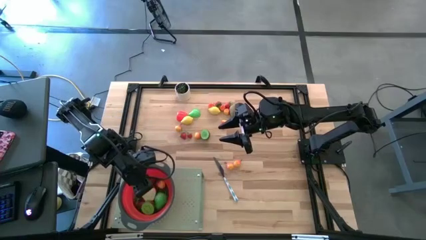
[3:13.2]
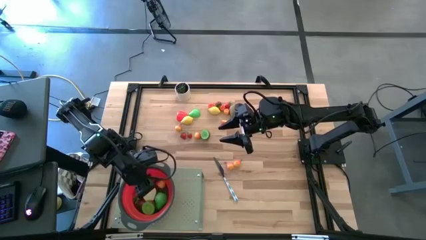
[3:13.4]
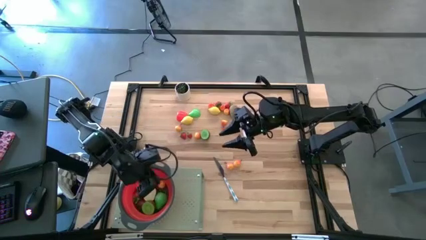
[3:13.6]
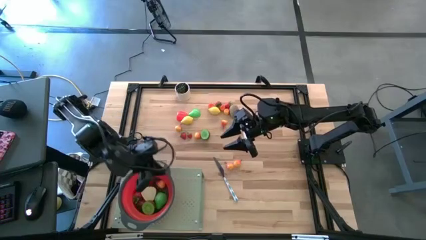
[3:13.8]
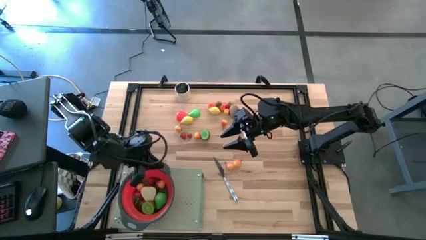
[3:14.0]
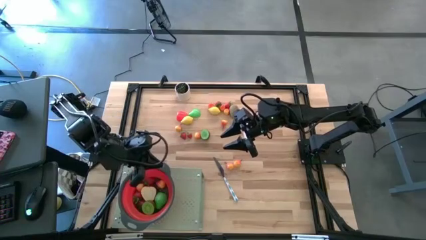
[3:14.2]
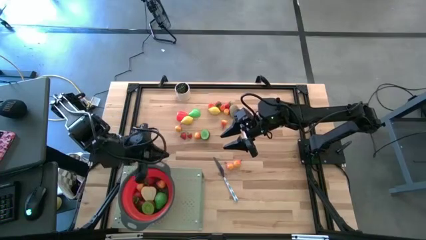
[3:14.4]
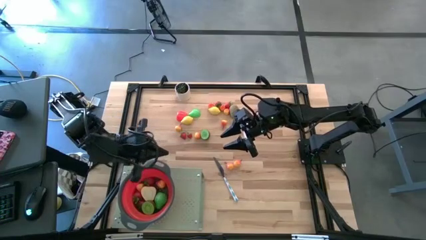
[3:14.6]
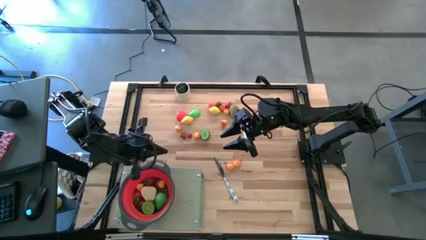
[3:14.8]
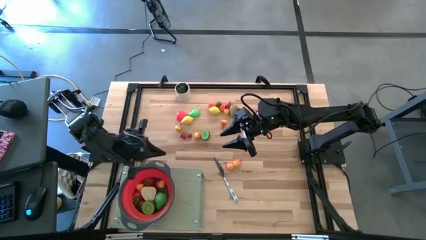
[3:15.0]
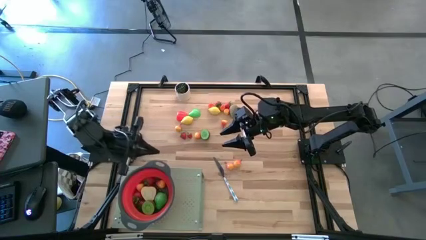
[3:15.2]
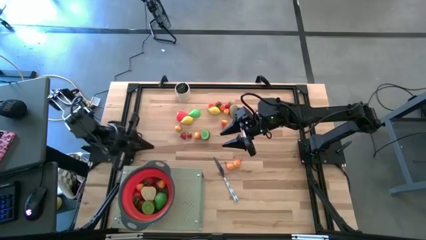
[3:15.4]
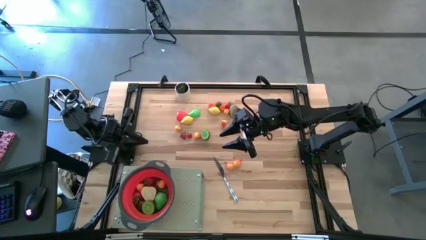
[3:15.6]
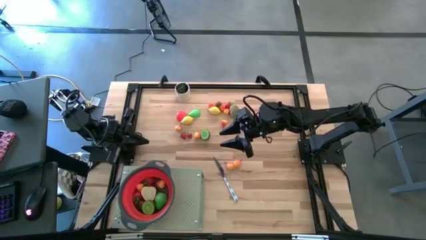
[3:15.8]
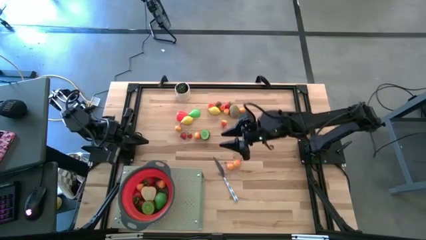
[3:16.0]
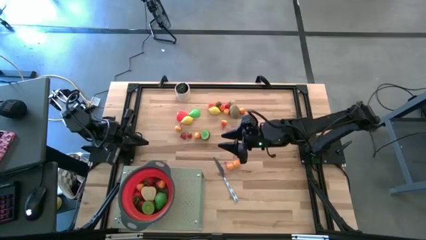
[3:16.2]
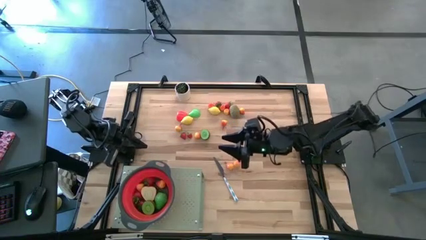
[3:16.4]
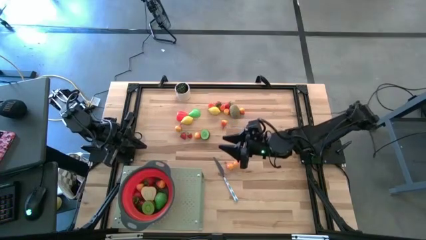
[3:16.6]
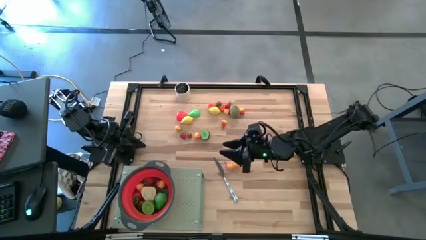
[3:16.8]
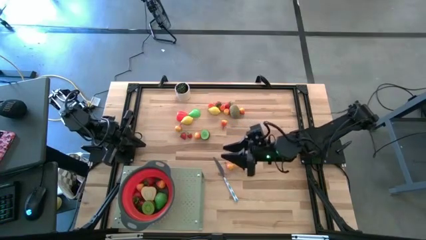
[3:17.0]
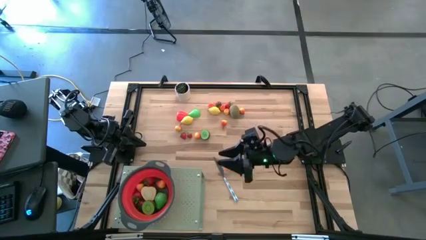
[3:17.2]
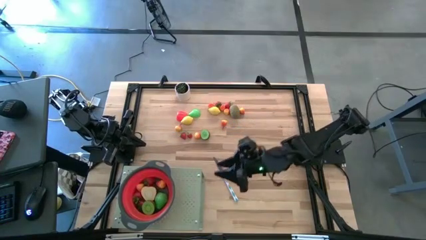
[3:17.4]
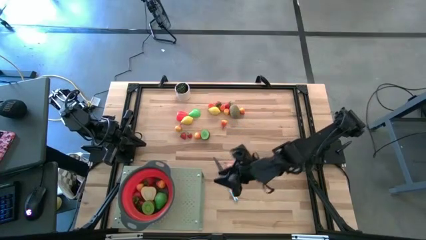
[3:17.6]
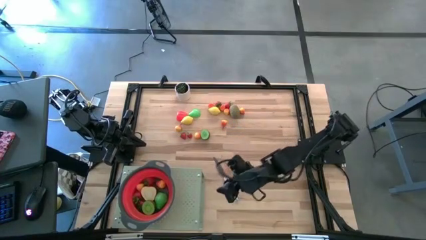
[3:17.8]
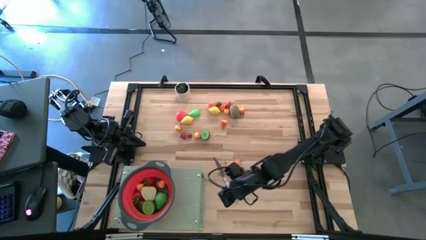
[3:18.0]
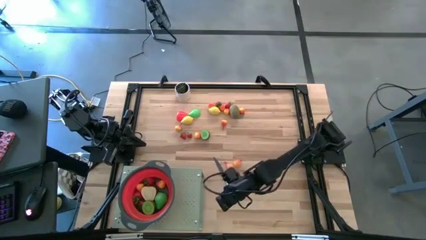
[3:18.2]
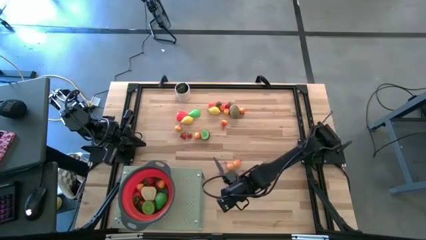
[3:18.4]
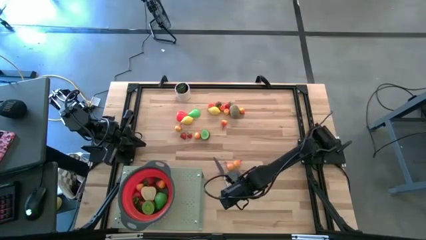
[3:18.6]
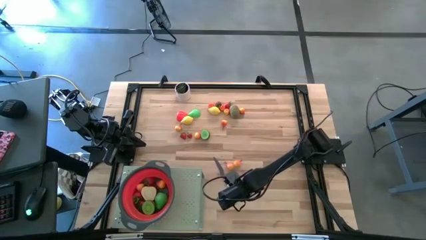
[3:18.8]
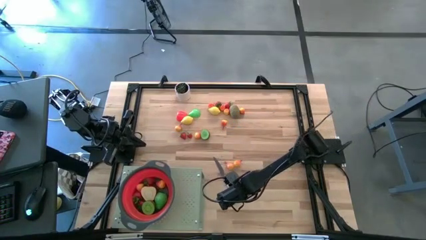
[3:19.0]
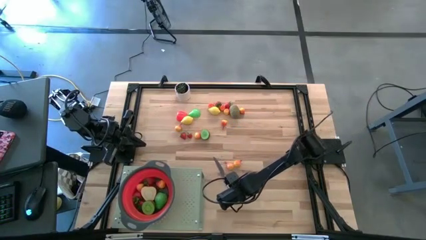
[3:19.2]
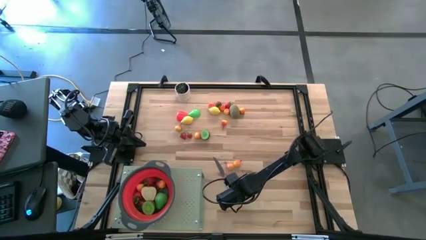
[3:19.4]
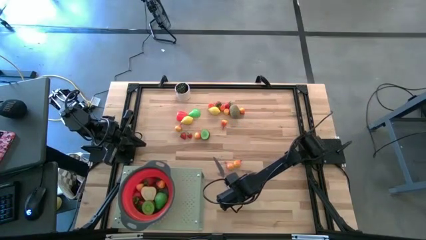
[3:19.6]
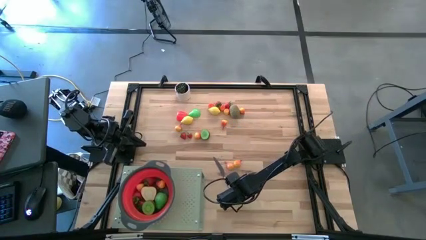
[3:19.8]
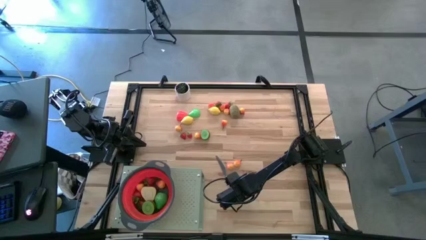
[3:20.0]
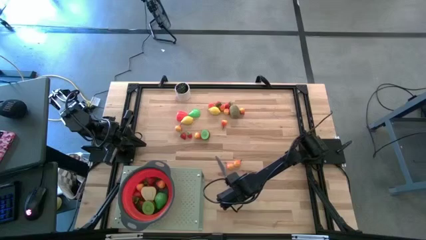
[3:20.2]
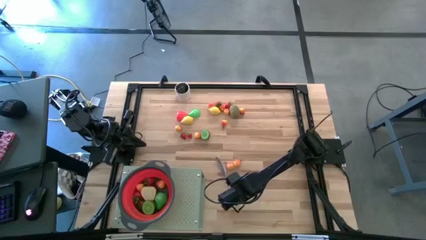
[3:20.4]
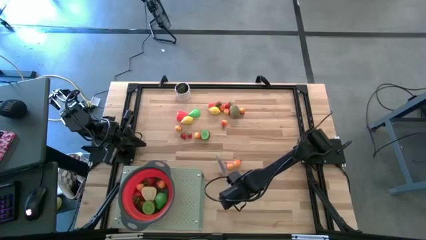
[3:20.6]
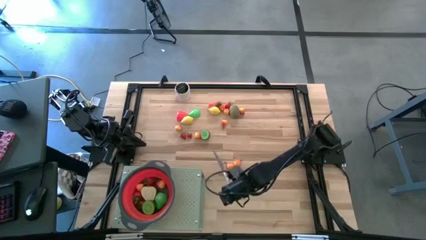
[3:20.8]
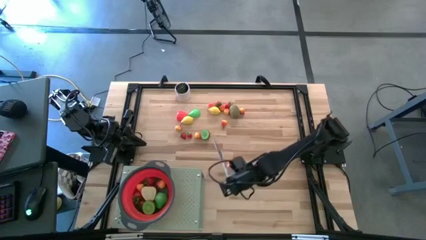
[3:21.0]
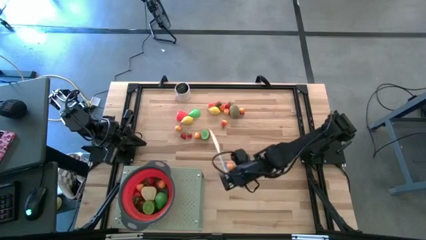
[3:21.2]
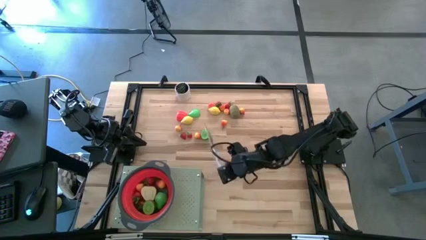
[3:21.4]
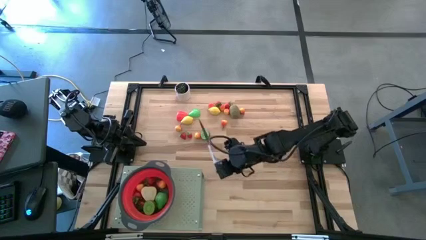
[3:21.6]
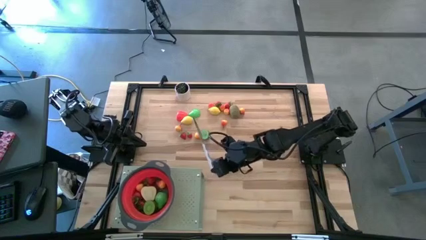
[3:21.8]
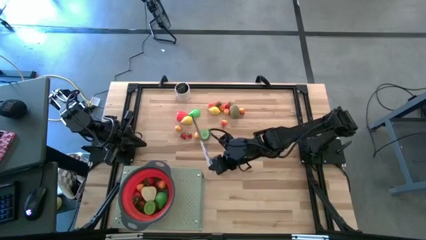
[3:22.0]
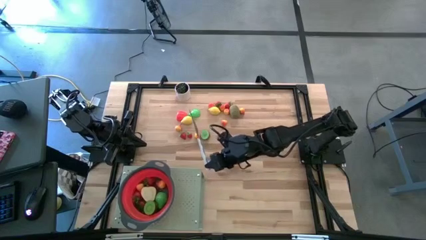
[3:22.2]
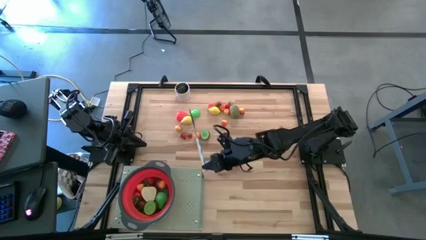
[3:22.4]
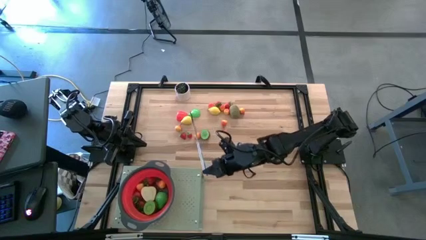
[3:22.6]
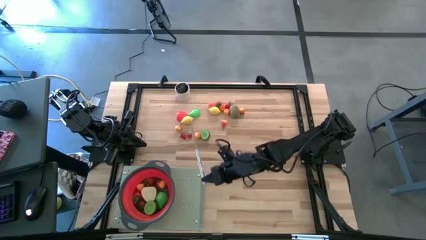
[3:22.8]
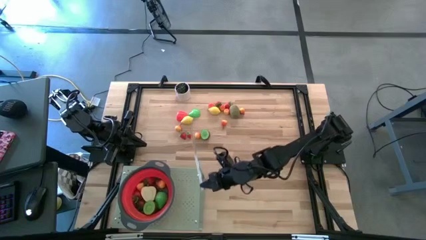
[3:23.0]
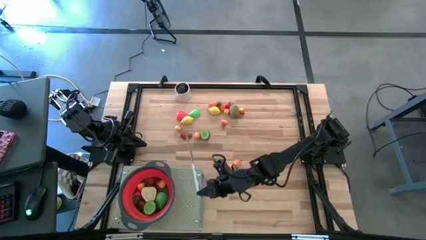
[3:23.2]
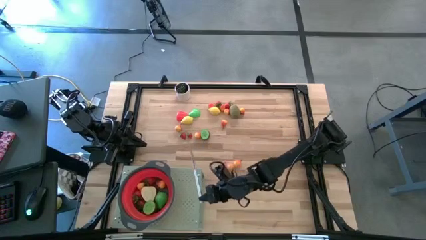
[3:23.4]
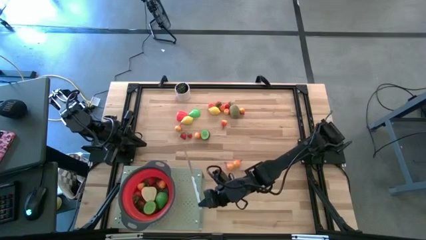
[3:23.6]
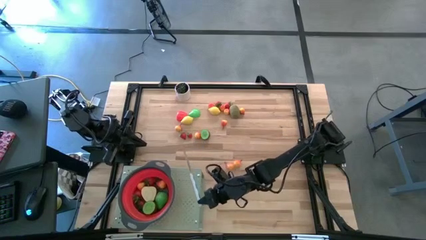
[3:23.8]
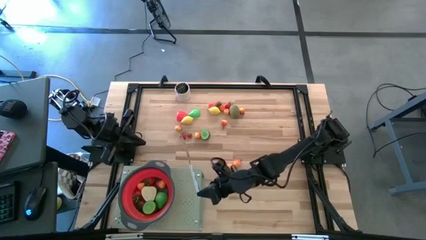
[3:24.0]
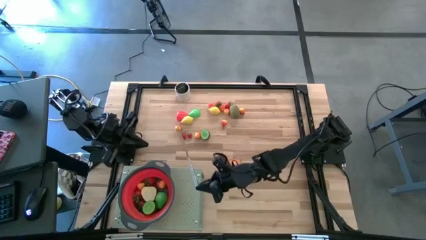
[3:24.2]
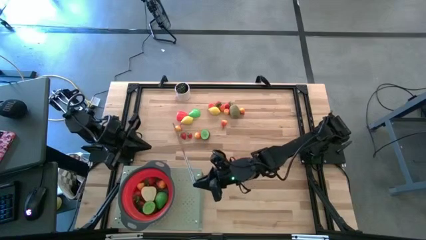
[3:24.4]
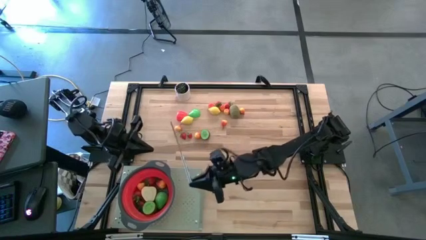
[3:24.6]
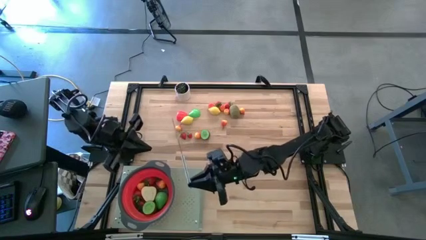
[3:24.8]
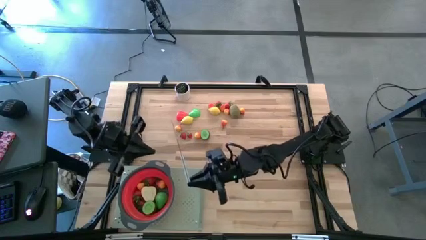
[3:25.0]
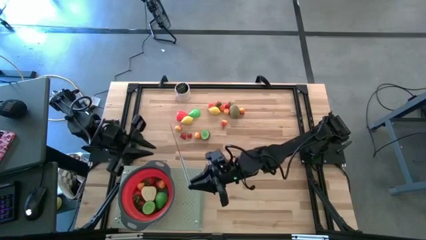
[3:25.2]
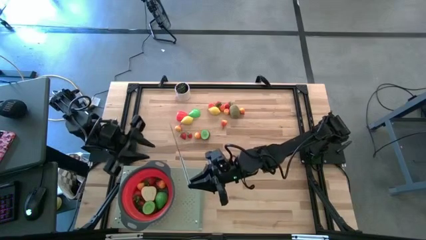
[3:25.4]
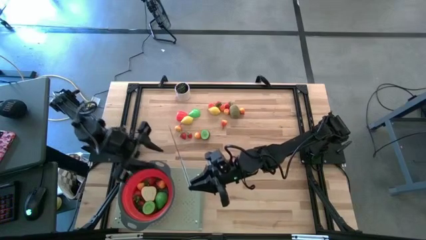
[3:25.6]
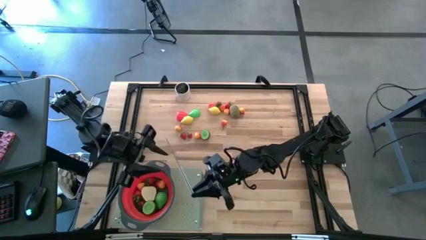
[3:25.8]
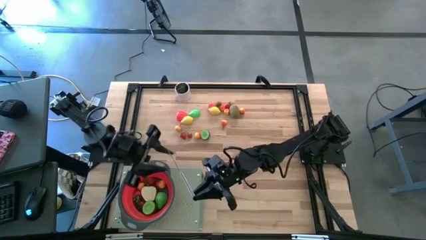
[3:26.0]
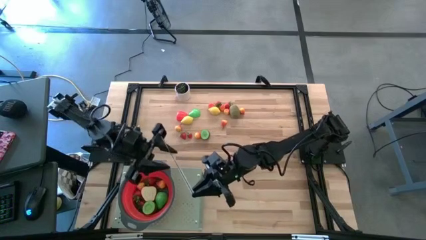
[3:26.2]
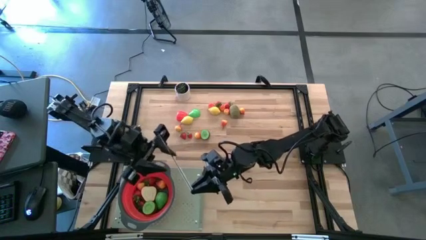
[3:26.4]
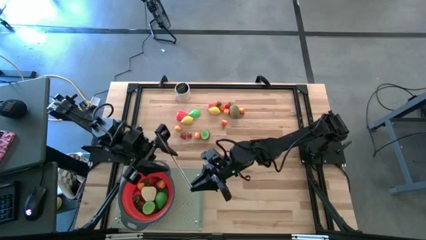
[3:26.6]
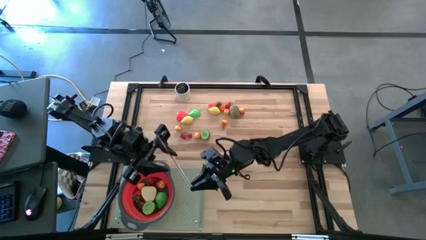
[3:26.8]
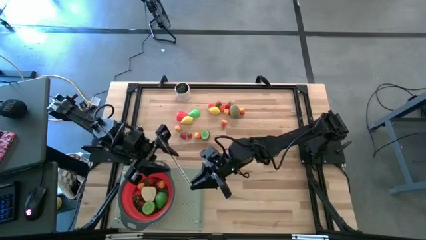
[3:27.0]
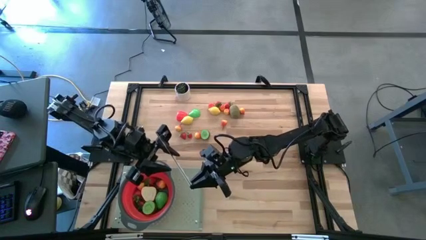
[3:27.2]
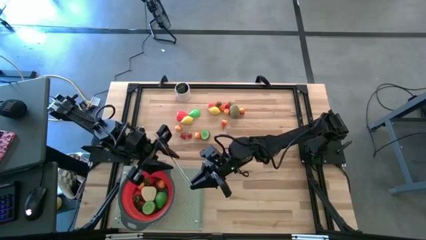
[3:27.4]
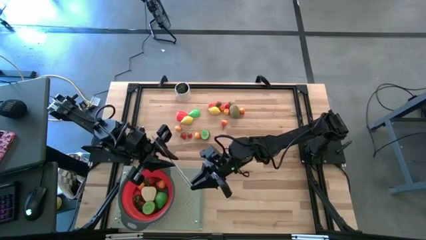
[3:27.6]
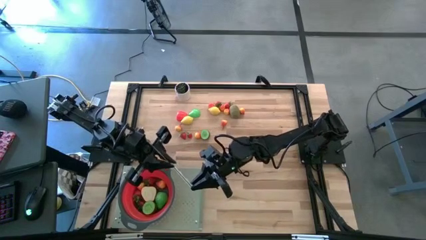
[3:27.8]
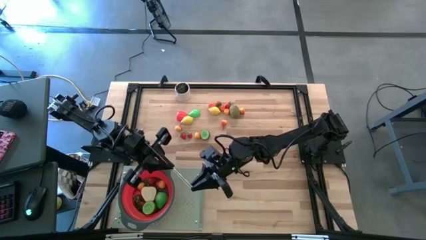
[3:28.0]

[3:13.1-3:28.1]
Task: Pick & Place Fruit
Put the table knife on the shelf

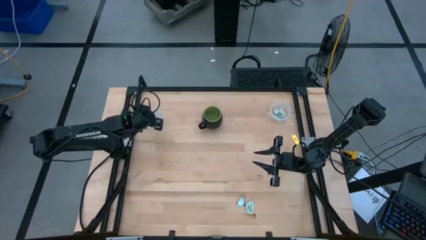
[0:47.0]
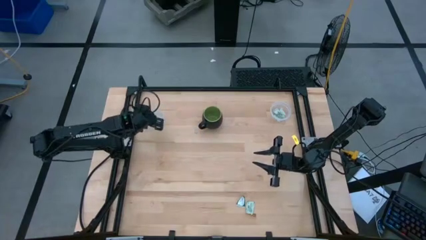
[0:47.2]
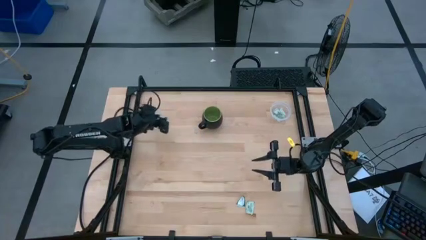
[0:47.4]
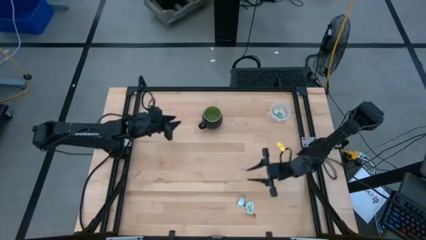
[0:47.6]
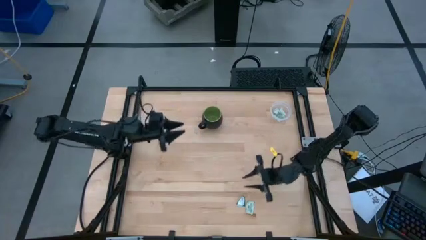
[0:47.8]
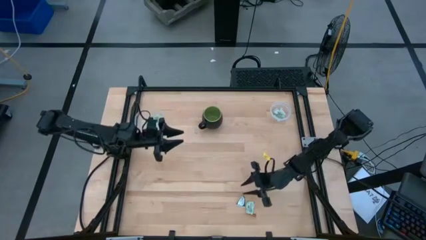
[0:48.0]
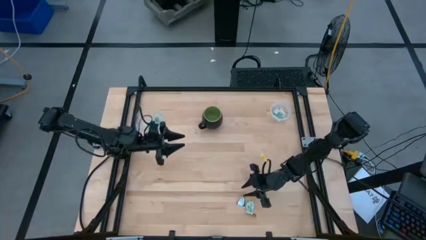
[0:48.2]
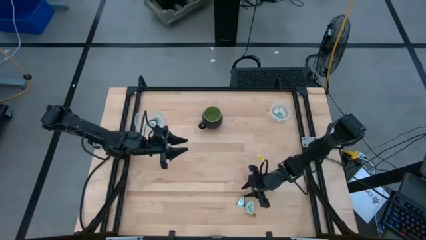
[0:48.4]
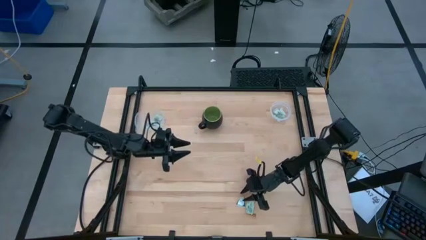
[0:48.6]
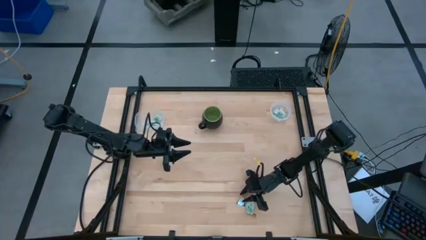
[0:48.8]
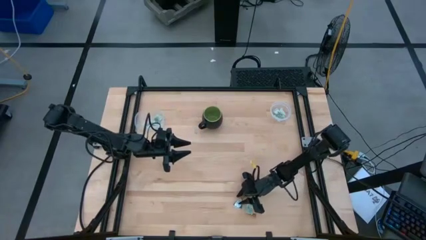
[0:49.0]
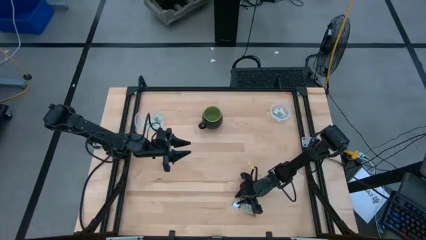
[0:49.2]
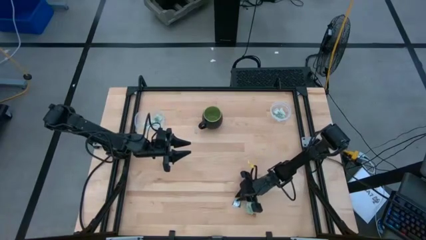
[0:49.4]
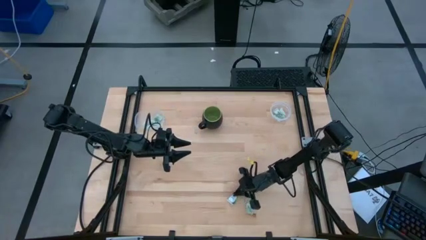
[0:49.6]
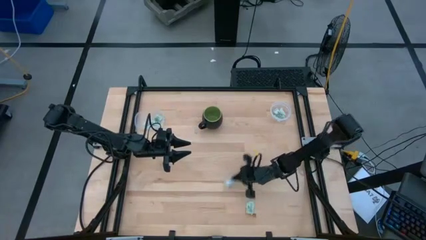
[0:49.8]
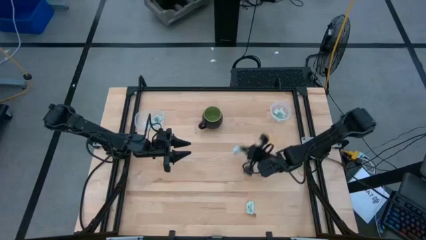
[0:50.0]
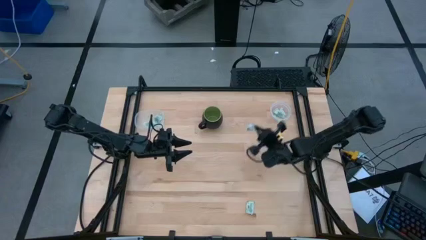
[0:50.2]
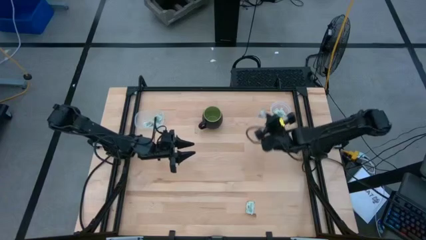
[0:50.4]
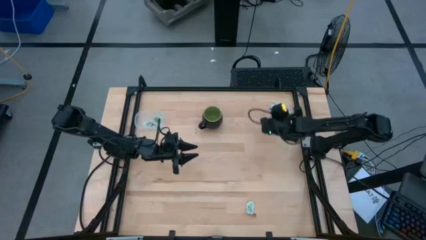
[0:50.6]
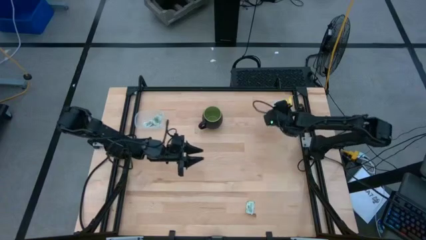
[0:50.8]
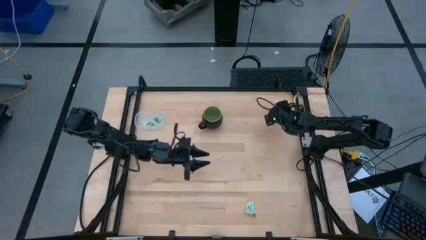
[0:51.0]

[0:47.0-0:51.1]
Task: Pick and place items into bin
Put the green truvia packet into the right transparent bin
